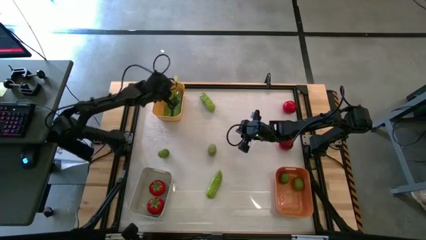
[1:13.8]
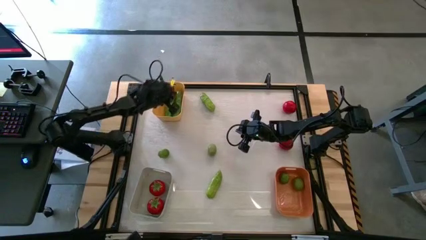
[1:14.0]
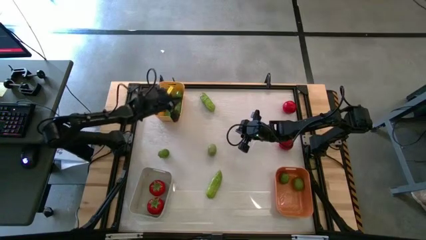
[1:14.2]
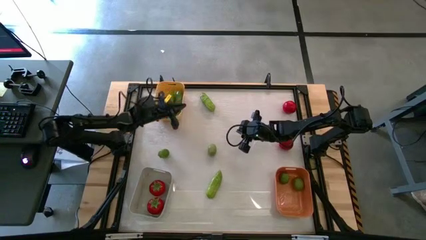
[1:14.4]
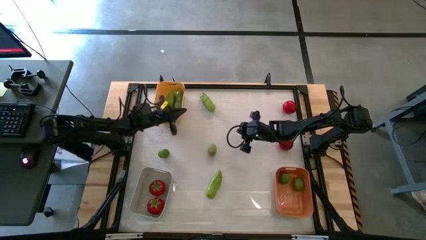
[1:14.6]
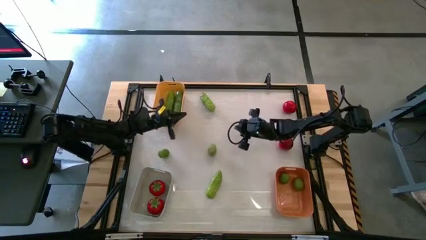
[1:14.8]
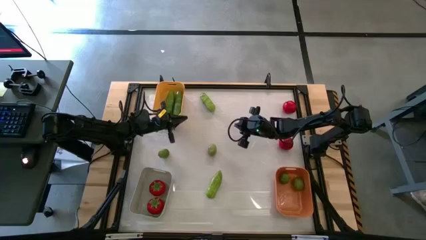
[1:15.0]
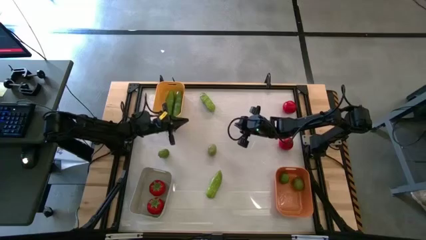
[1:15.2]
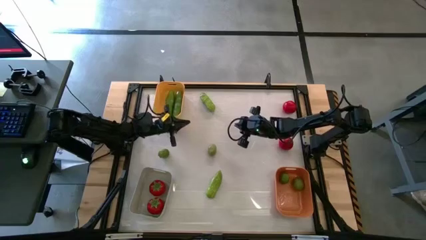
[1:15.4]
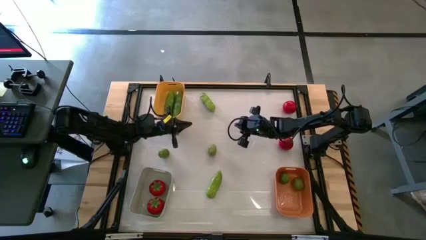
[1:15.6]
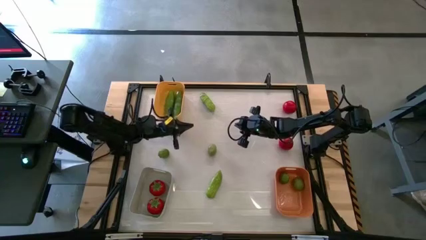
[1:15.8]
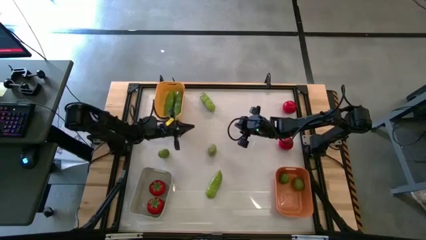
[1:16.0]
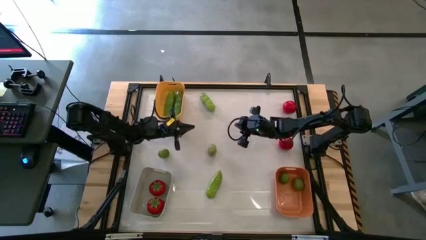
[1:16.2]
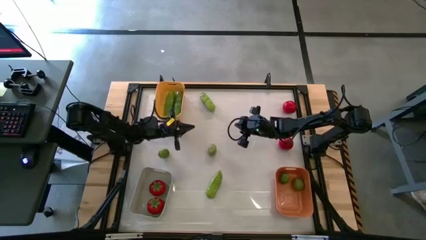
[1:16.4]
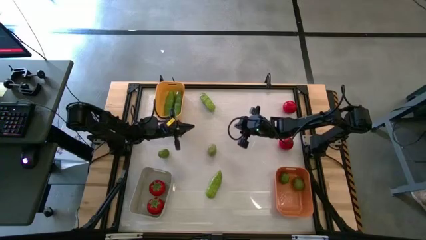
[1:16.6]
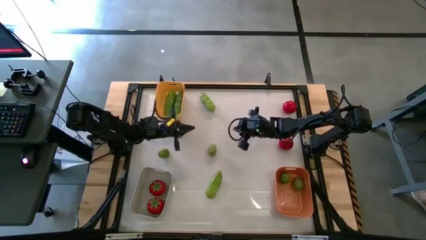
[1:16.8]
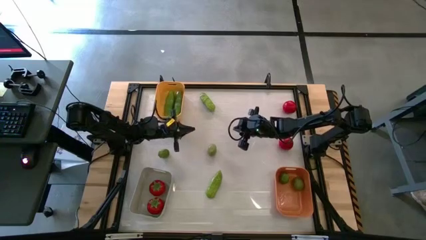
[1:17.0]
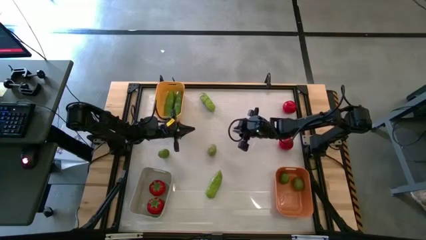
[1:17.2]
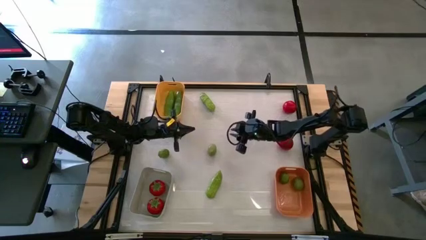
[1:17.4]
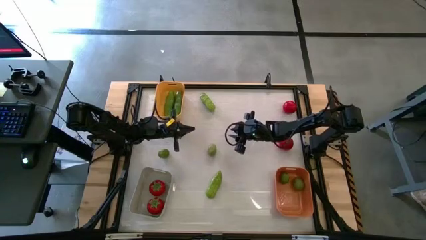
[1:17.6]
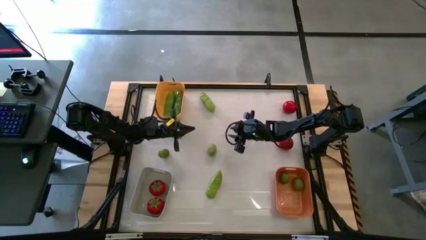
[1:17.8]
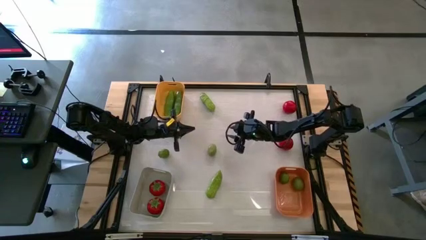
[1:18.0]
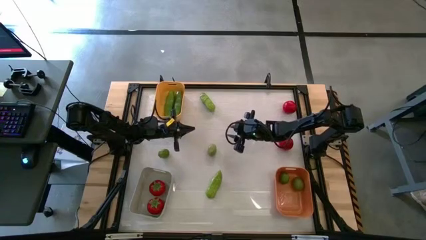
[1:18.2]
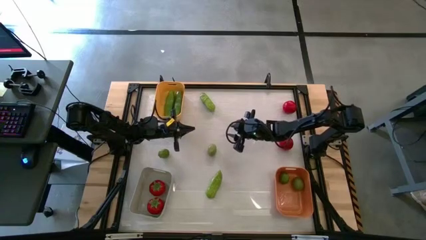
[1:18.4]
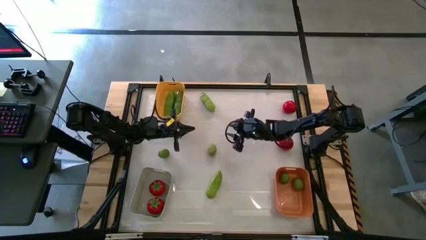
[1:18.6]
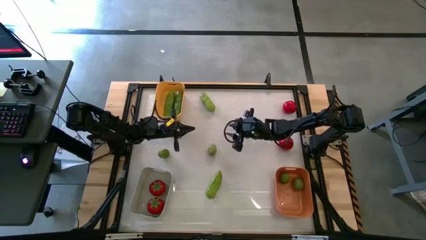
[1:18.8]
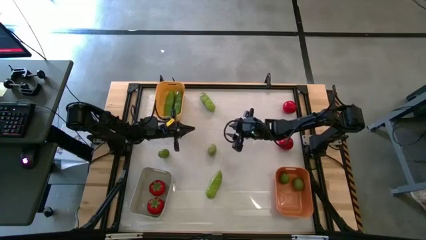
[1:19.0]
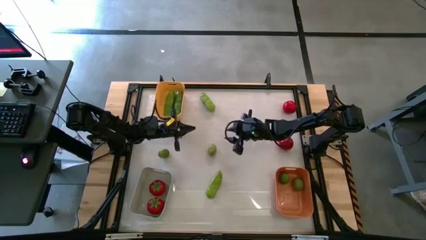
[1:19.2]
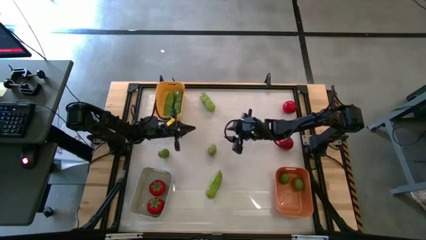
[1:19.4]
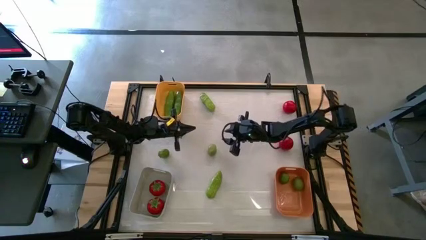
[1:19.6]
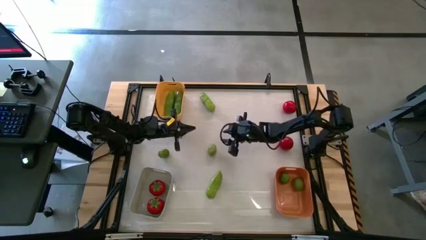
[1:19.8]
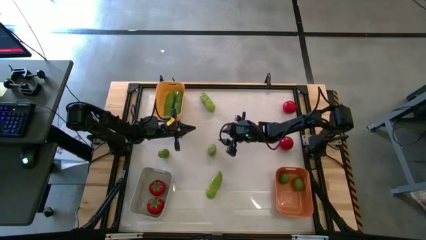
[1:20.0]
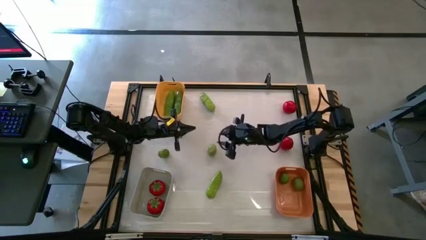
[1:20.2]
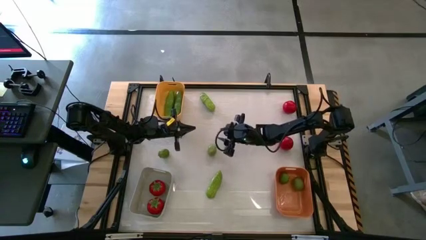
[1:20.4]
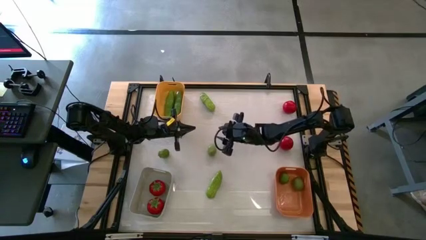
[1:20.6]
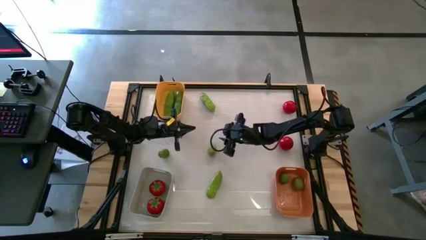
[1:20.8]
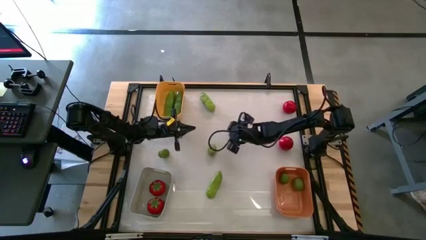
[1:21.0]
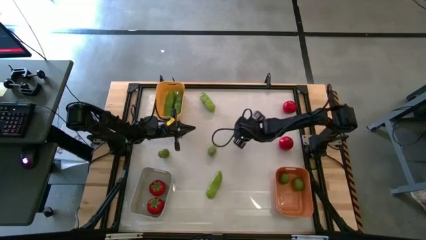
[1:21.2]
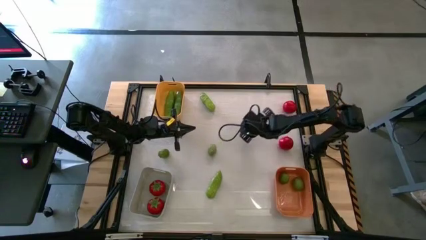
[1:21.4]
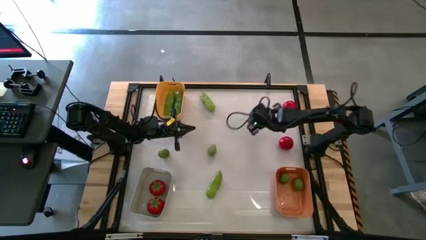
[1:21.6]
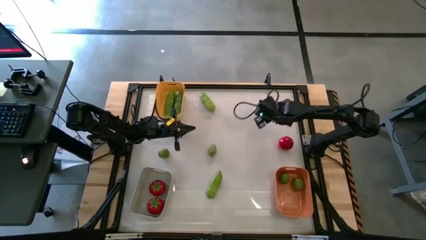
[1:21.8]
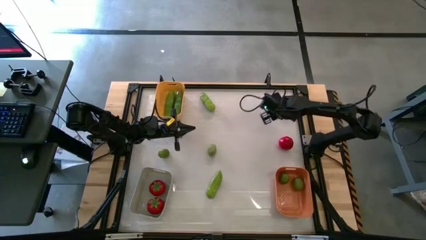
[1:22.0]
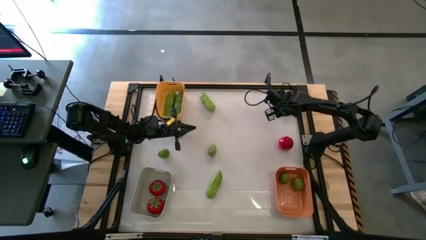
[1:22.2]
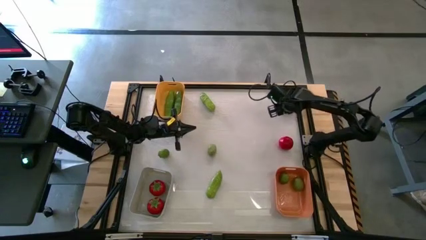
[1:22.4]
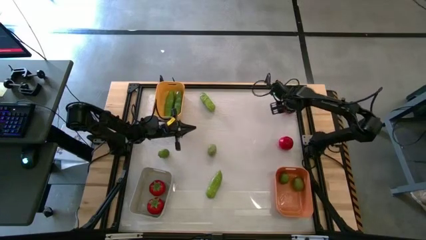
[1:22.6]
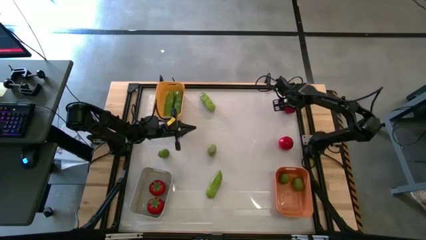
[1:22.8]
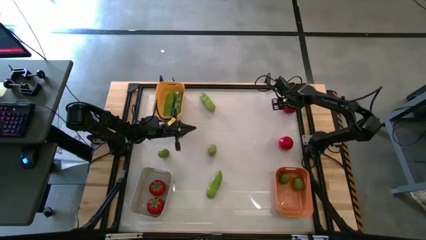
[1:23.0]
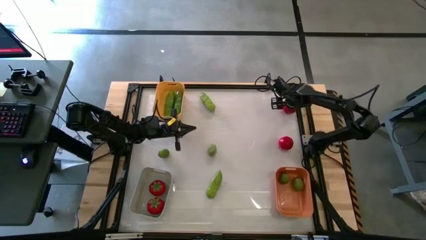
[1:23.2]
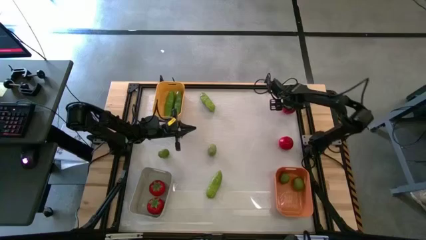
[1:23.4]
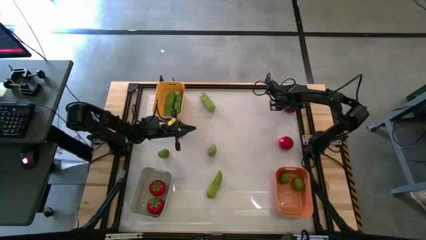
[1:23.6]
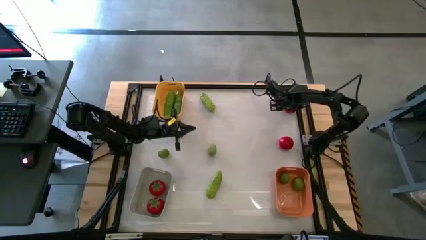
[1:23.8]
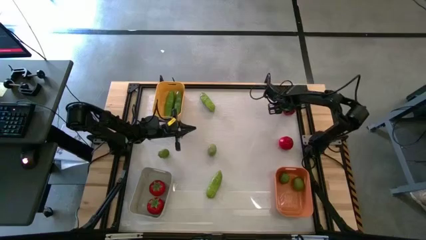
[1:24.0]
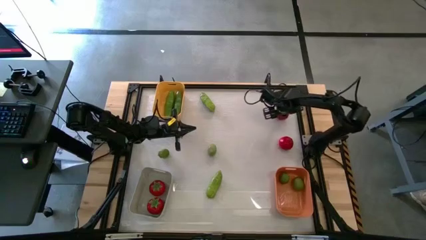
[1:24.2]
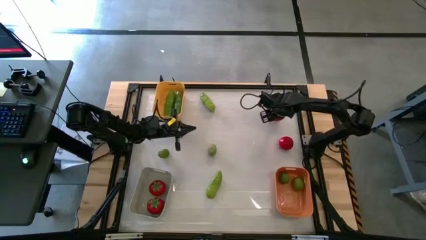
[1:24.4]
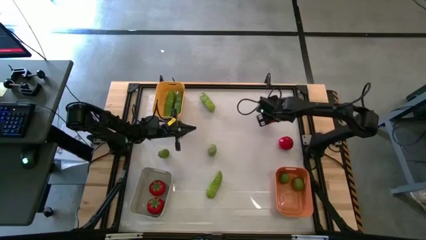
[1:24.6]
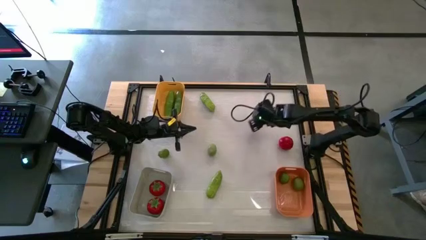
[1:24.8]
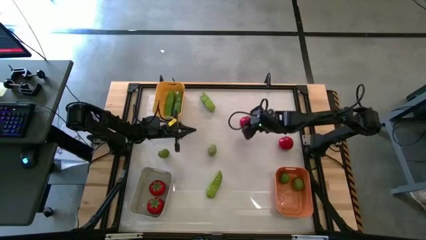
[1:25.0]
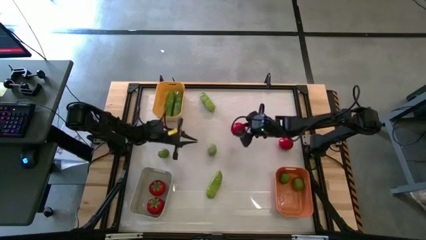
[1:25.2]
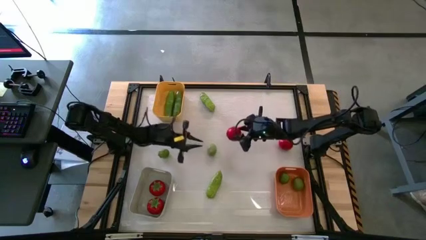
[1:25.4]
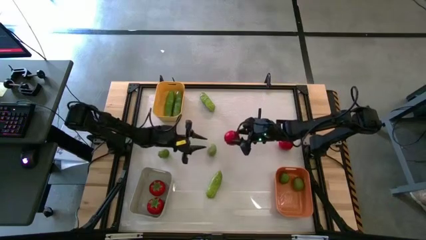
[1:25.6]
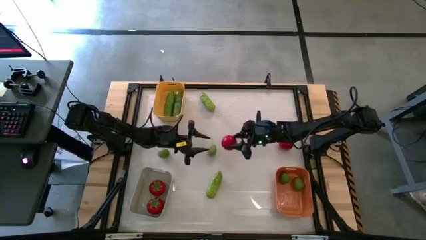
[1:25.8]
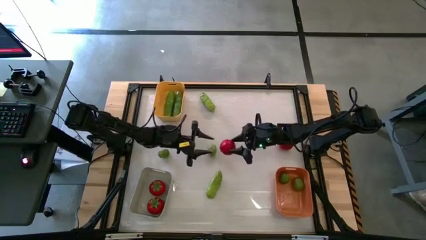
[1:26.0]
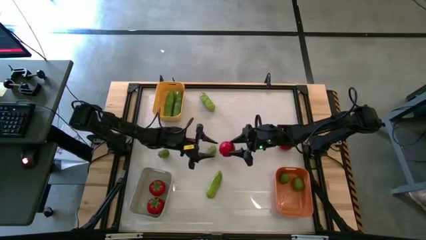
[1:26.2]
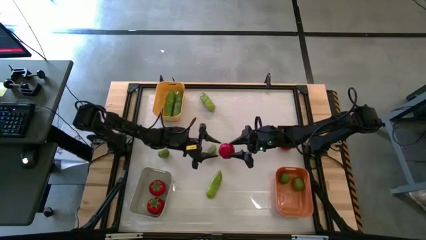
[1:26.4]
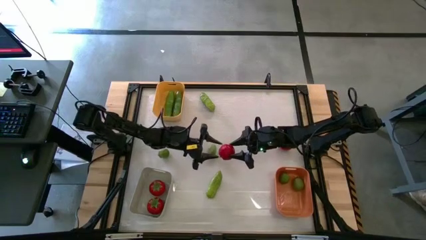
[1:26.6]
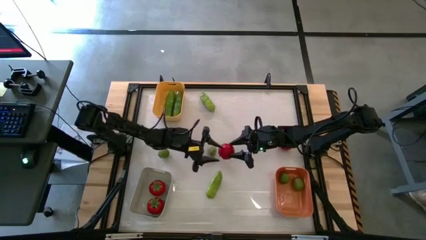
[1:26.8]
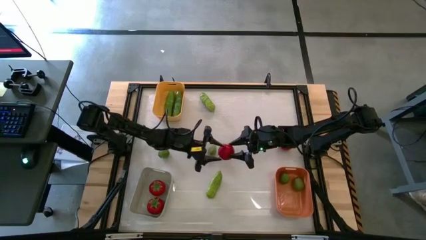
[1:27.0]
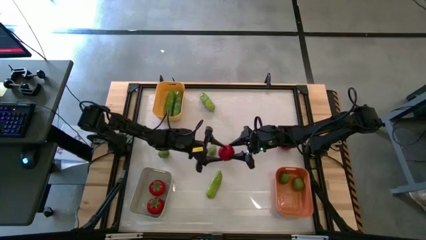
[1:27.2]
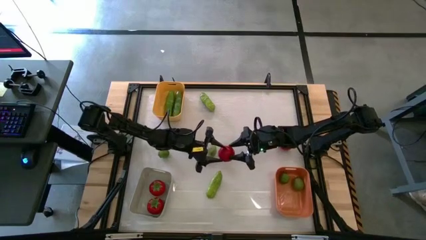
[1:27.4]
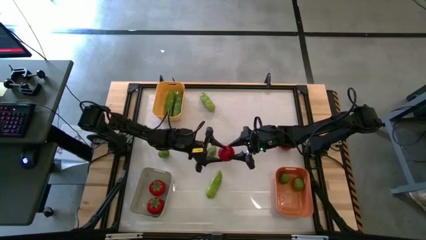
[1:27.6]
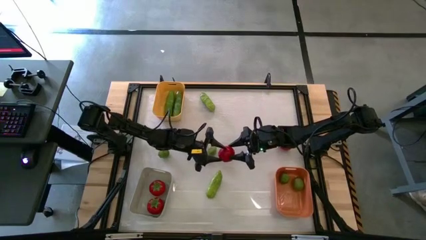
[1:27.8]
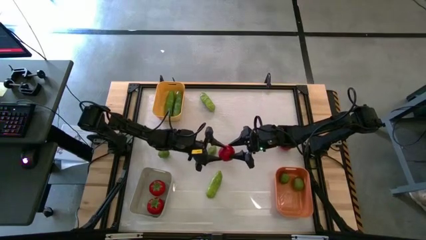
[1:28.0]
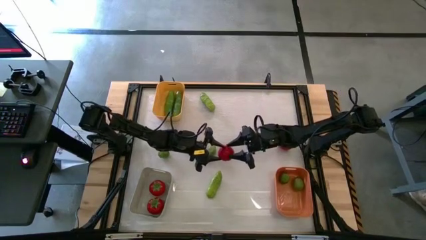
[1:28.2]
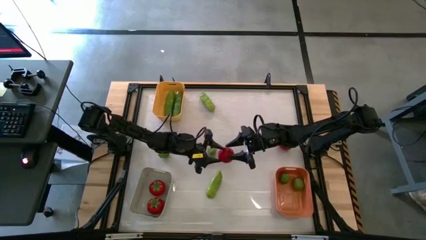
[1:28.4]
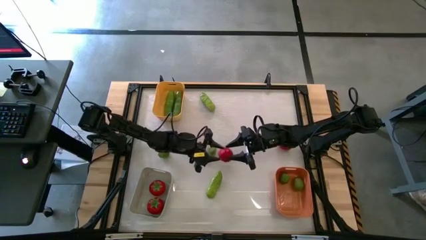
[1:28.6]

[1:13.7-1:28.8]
Task: Sort produce into baskets
Put the top tomato into the gray bin
